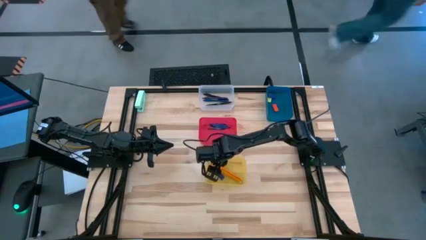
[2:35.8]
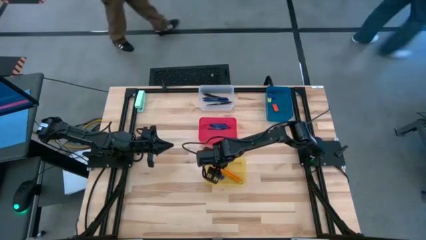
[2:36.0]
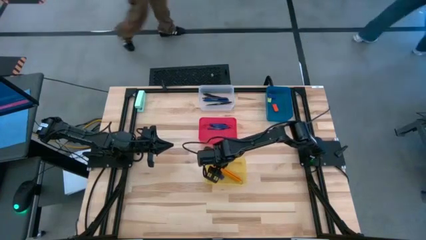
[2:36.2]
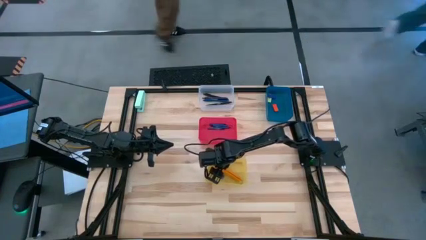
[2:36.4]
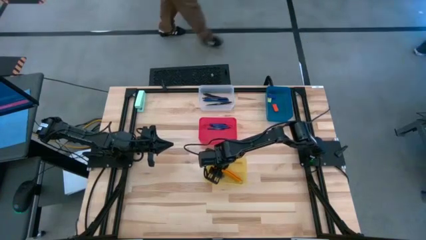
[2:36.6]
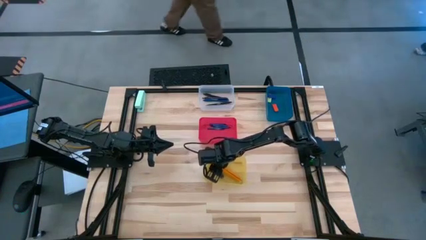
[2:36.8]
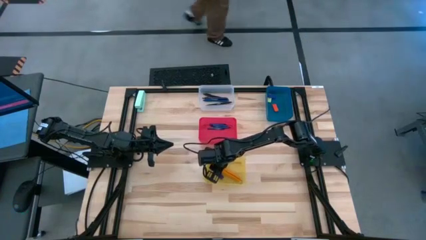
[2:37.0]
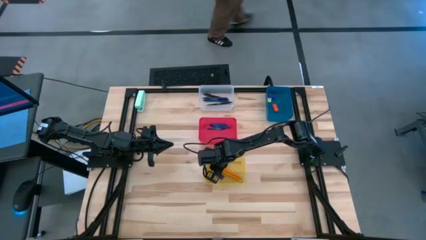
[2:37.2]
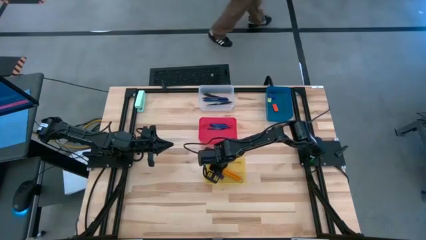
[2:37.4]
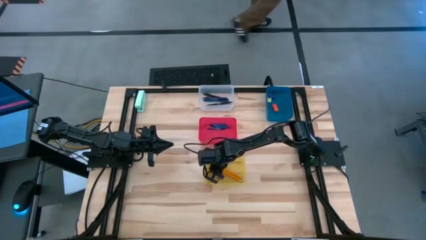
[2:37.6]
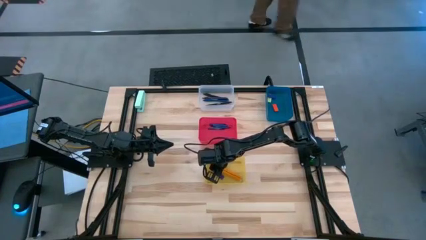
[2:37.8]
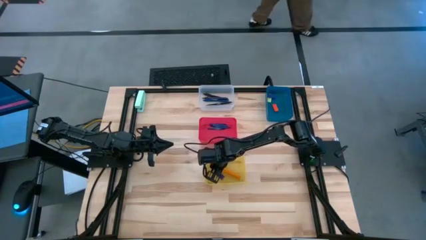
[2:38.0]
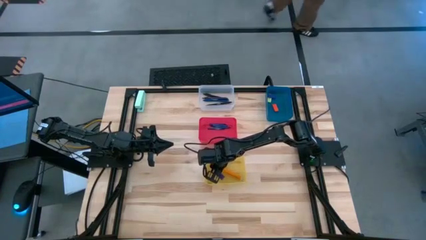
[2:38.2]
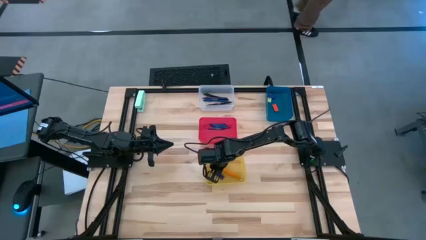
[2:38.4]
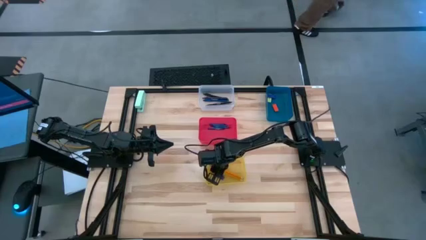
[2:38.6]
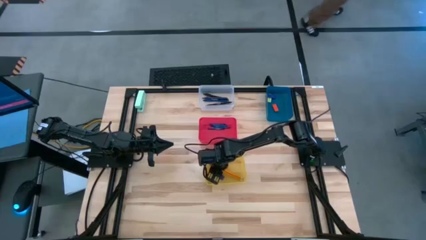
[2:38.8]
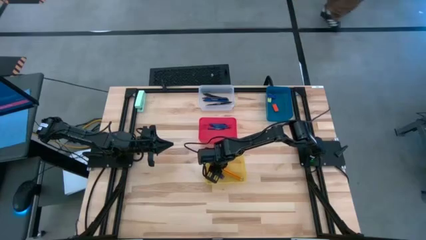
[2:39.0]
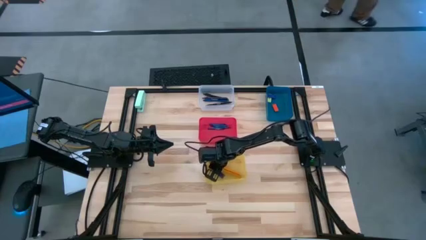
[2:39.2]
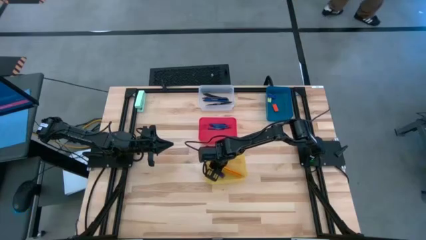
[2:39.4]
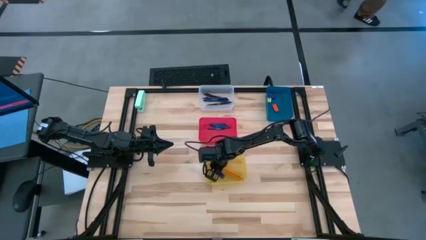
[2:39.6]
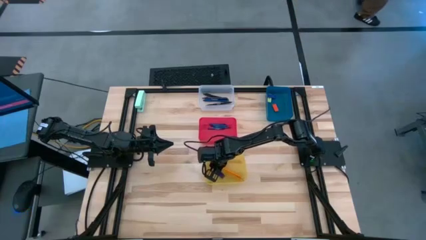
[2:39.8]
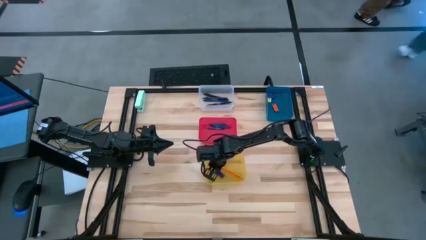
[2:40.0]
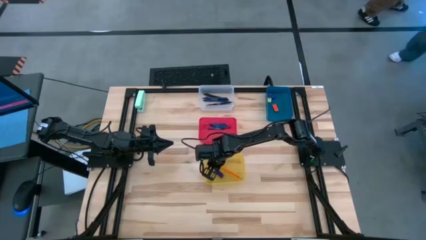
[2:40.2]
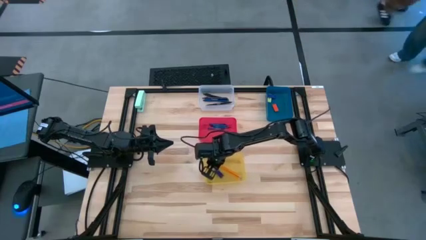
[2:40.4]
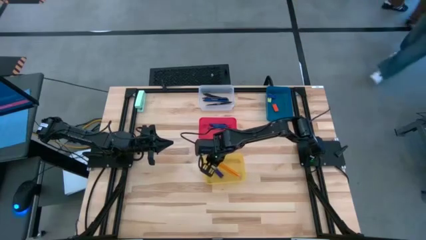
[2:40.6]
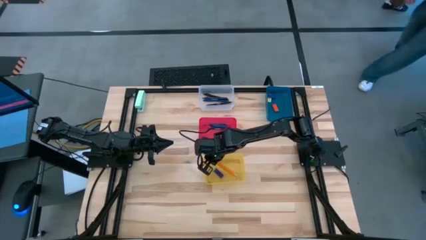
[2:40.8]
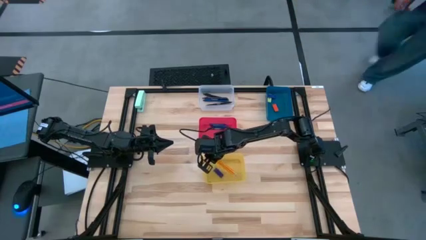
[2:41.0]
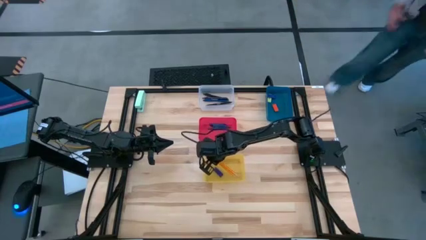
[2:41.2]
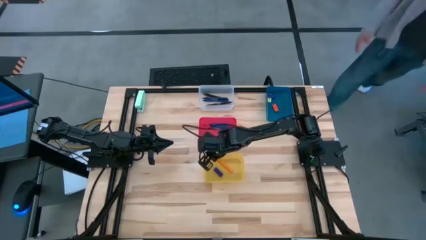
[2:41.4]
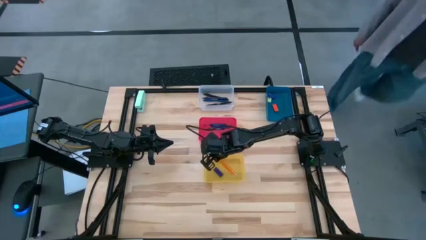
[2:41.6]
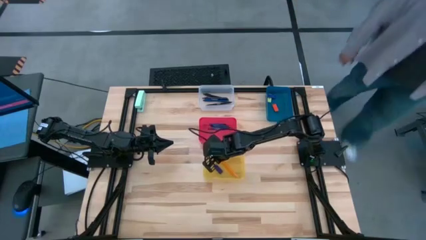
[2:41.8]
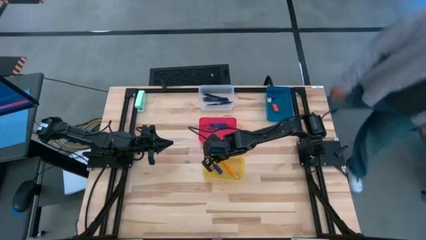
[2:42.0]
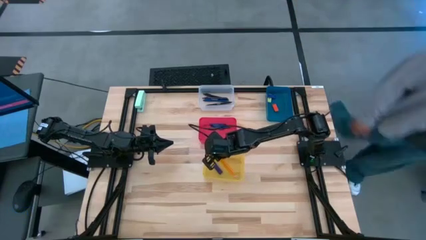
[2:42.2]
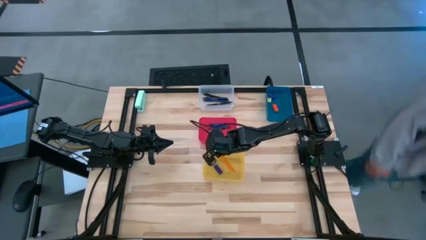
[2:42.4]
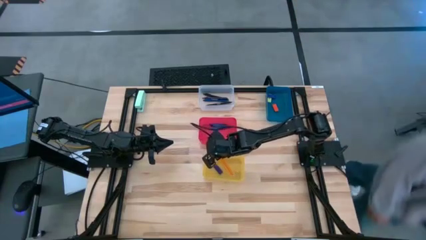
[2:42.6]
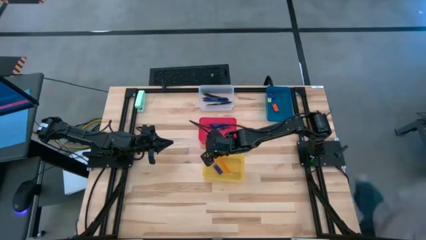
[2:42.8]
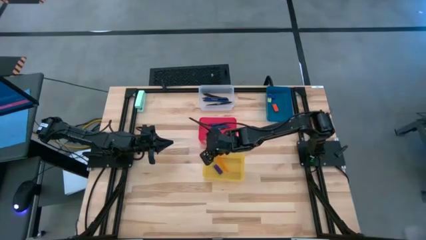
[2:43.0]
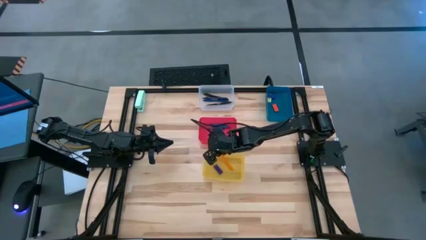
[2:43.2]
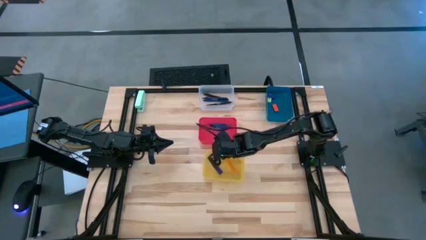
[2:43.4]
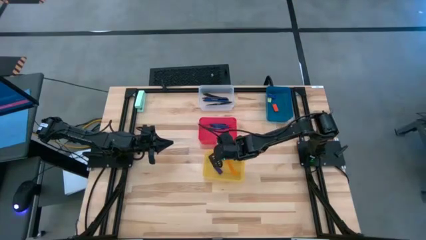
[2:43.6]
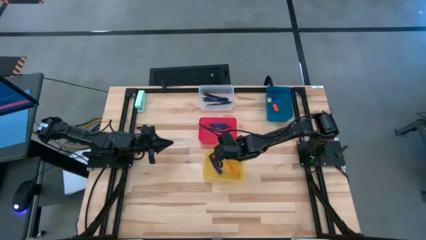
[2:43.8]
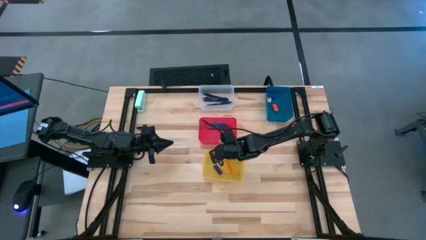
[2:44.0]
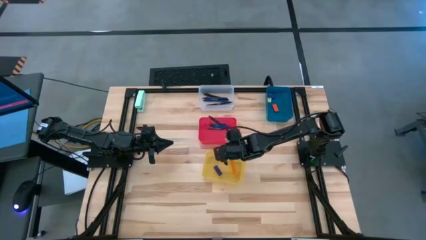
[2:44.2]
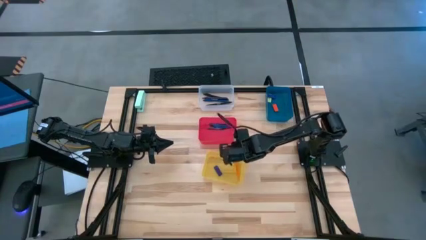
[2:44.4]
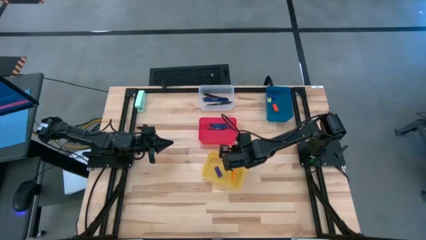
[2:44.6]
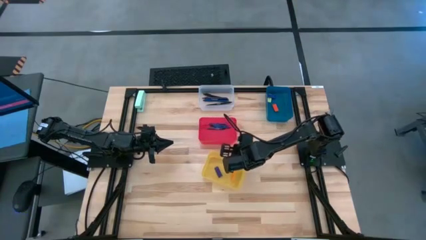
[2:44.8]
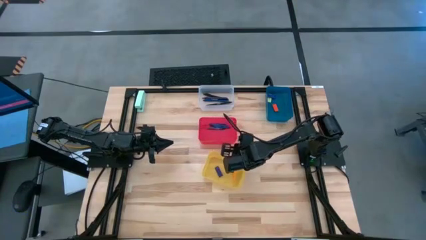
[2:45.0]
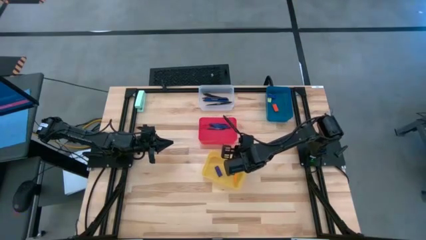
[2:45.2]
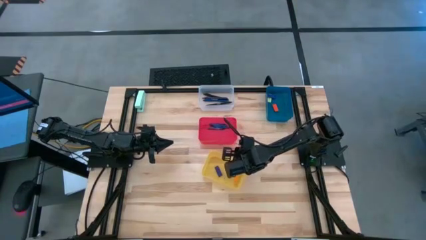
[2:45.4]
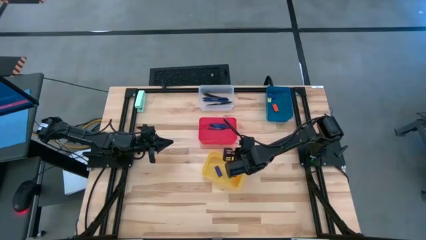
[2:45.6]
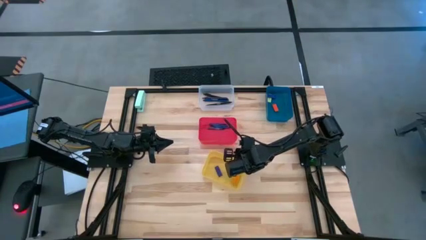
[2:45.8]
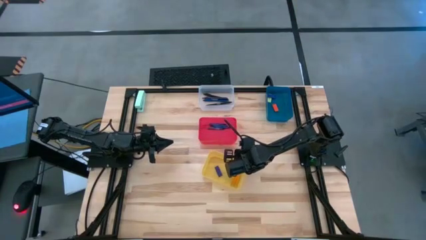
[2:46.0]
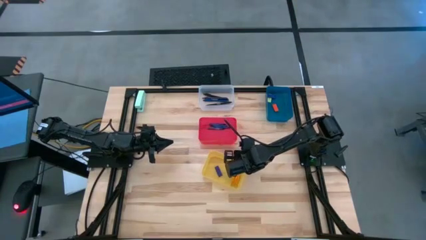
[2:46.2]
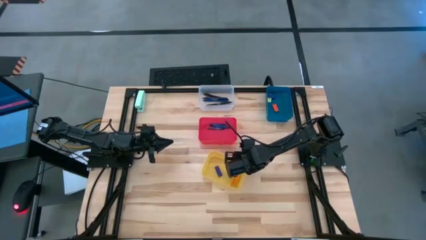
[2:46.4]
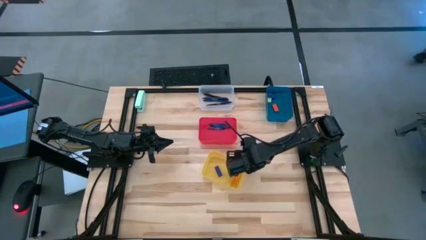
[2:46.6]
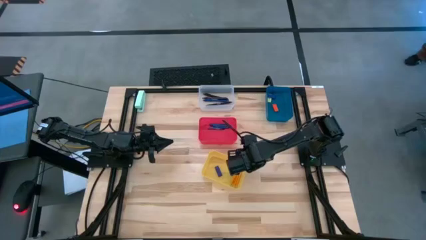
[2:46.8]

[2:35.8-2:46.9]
Task: Sort crayons/erasers/pens/pencils in bins
Adjust the orange pencils in the yellow bin

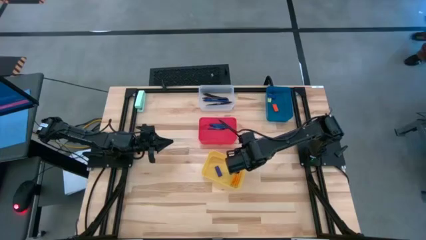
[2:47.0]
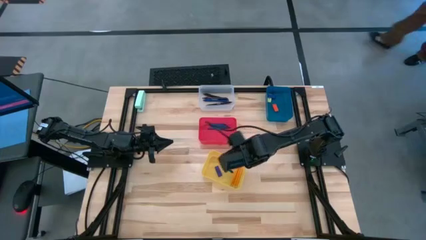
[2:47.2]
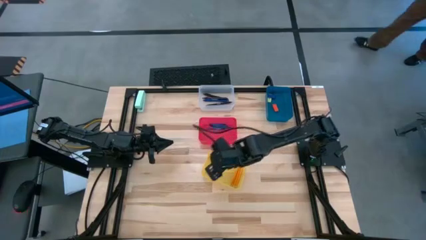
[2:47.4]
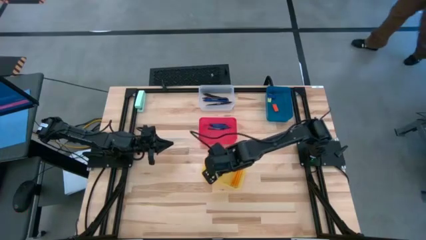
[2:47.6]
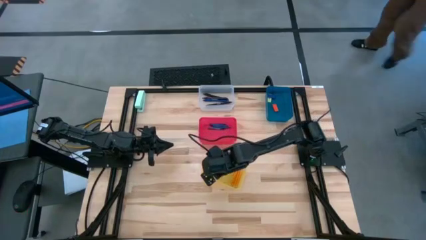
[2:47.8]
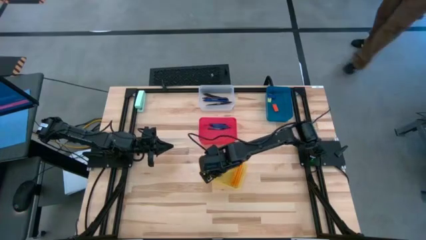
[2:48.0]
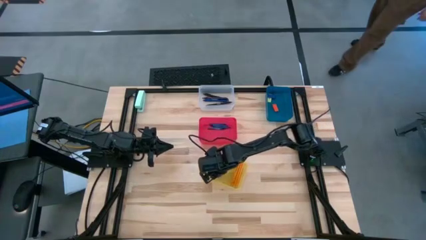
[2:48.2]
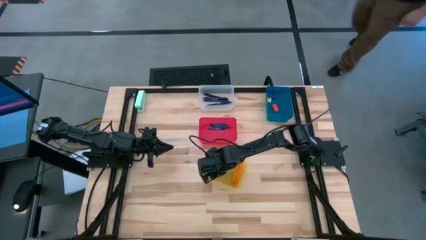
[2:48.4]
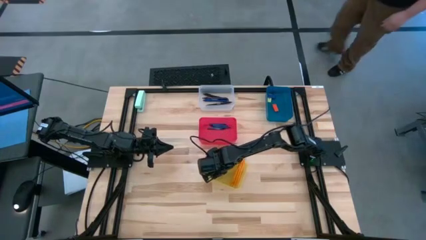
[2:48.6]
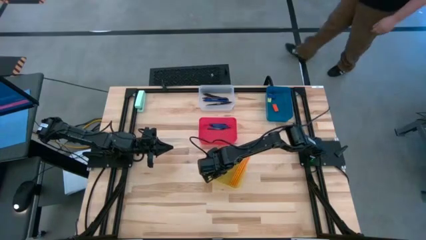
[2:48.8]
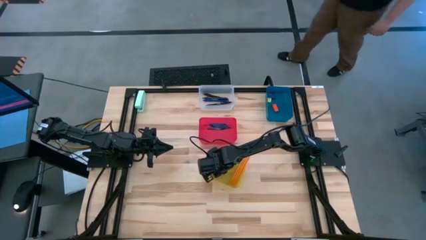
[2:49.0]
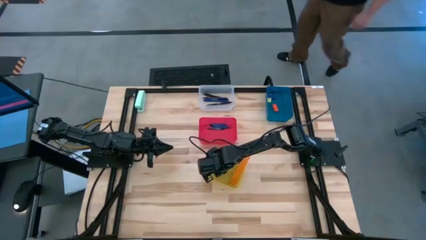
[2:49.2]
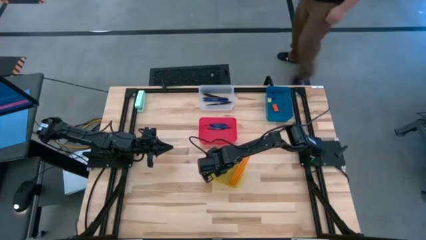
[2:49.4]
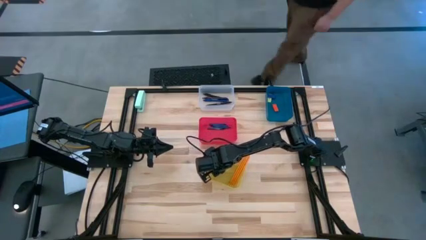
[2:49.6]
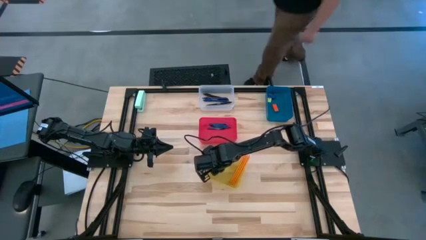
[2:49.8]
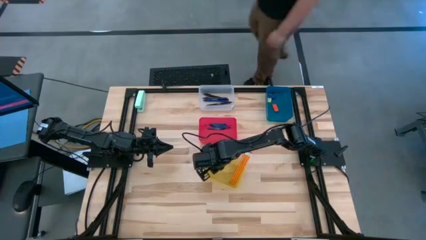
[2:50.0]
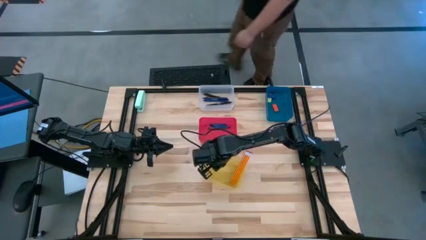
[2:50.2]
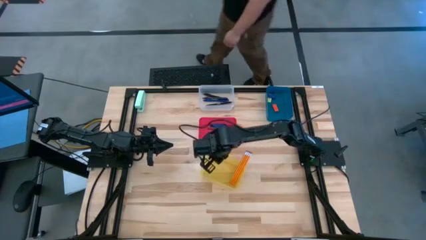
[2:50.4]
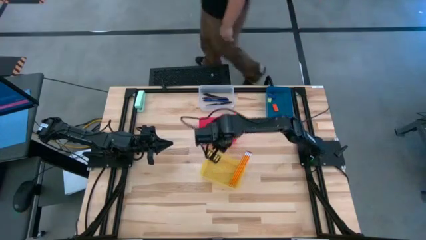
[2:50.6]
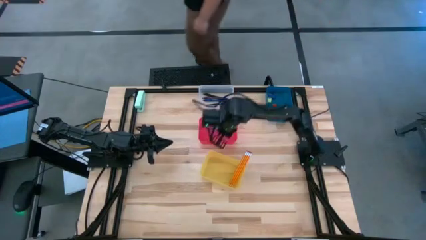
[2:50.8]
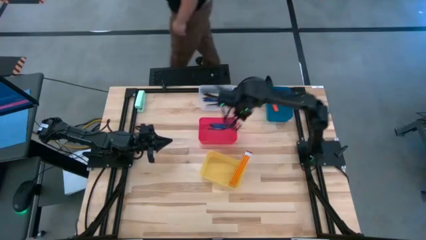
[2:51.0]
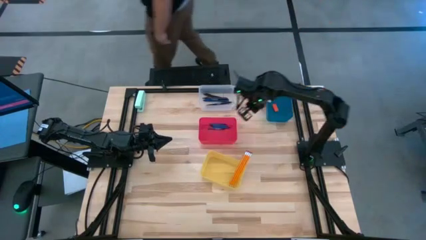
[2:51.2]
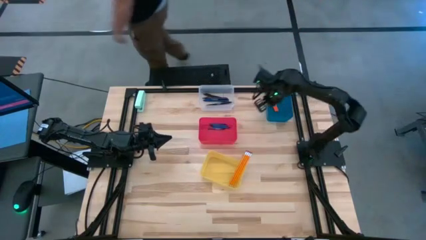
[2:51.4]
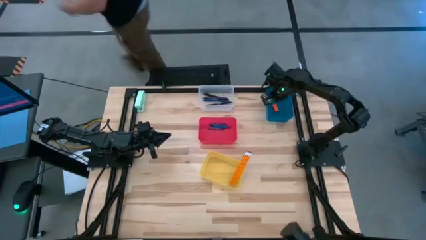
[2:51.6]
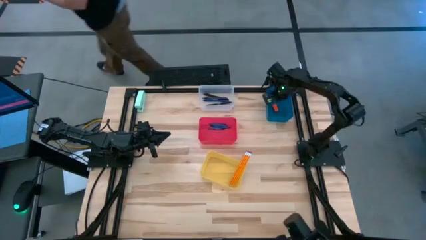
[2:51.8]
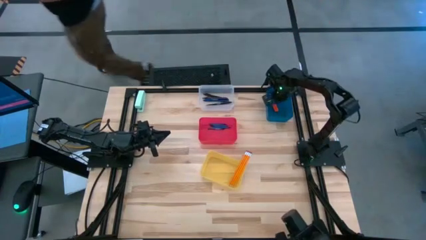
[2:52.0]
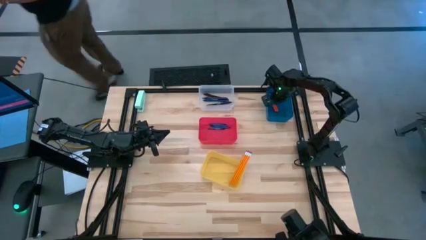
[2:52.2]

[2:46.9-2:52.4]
Put the blue eraser into the blue bin
